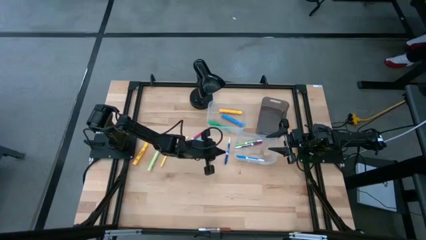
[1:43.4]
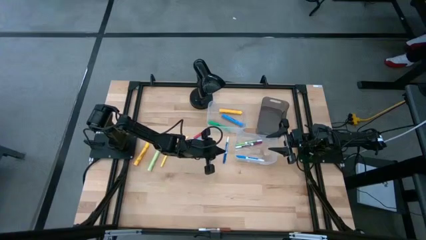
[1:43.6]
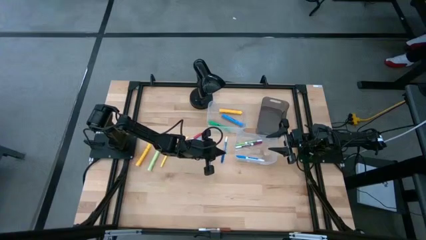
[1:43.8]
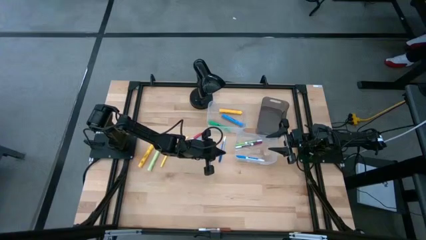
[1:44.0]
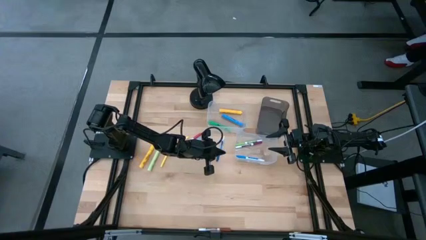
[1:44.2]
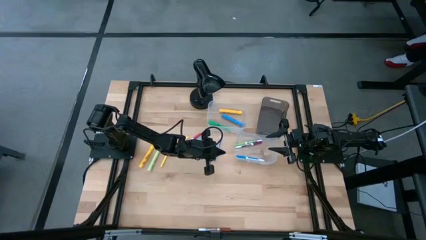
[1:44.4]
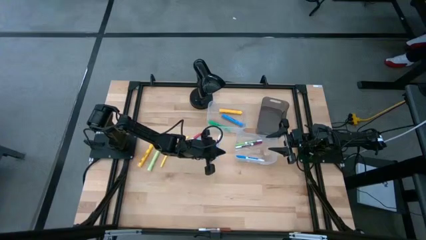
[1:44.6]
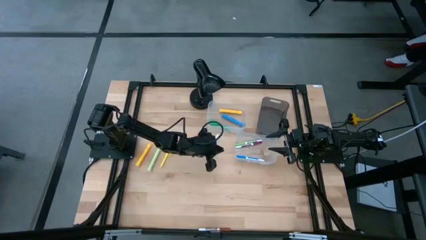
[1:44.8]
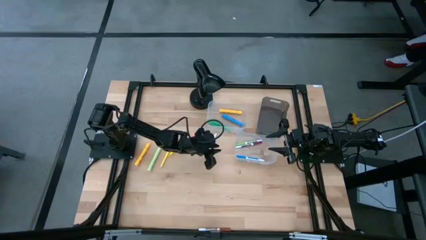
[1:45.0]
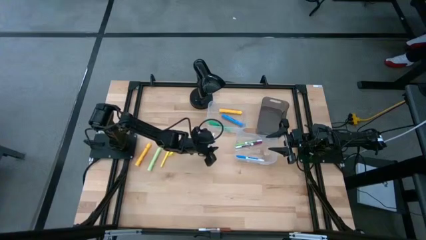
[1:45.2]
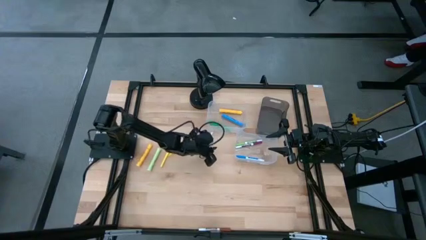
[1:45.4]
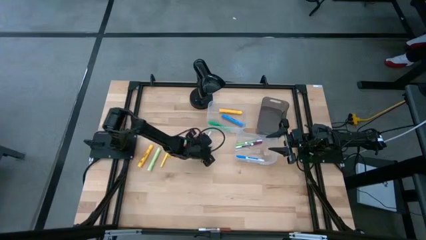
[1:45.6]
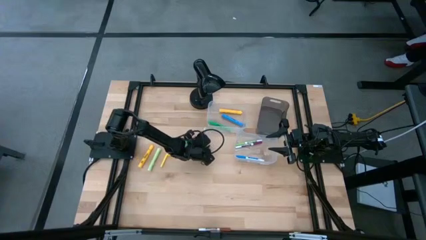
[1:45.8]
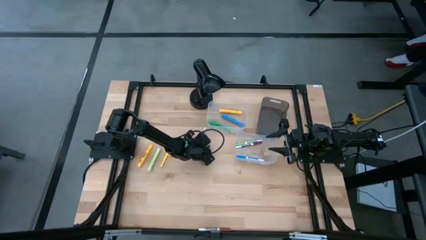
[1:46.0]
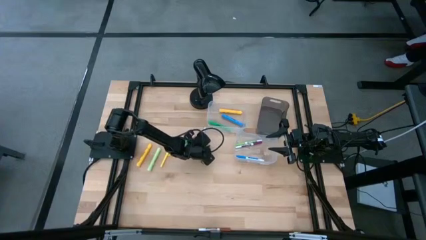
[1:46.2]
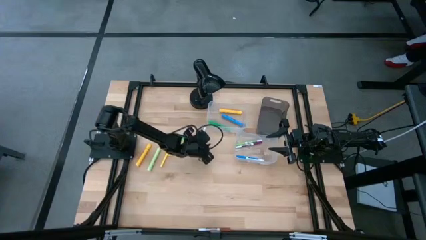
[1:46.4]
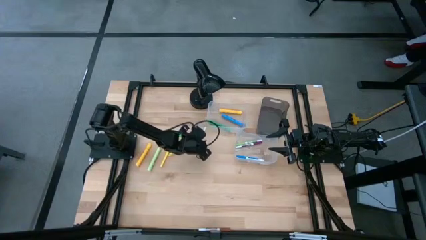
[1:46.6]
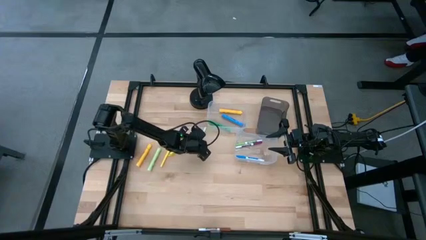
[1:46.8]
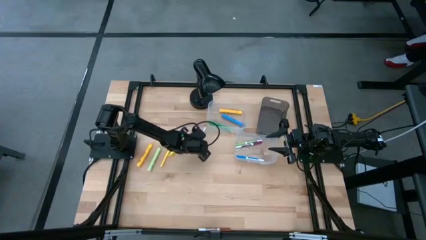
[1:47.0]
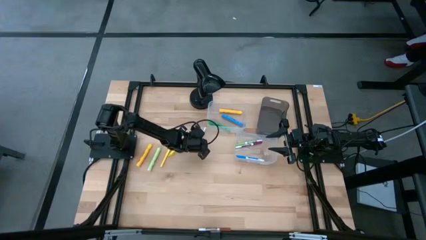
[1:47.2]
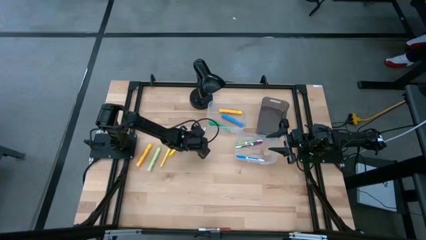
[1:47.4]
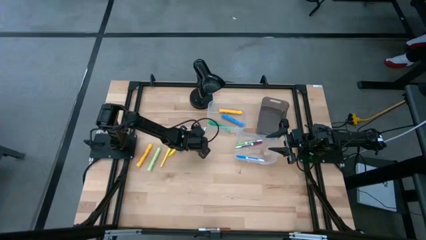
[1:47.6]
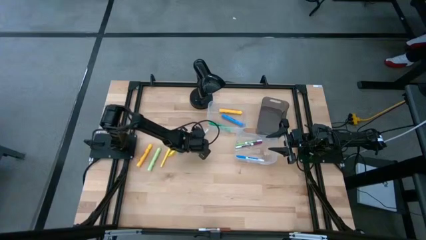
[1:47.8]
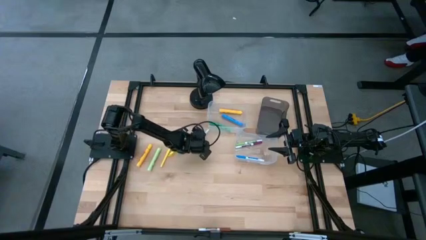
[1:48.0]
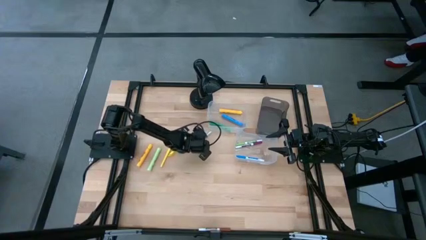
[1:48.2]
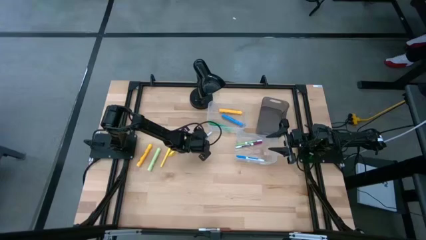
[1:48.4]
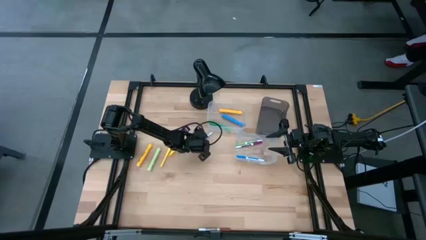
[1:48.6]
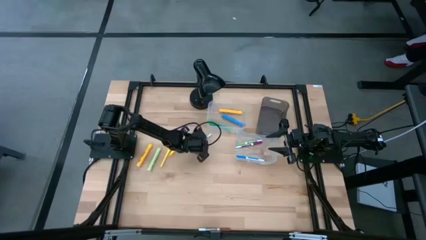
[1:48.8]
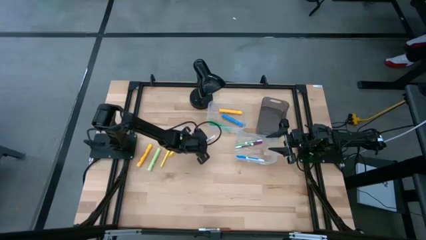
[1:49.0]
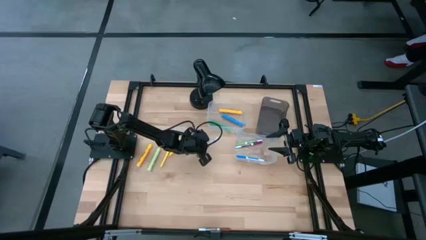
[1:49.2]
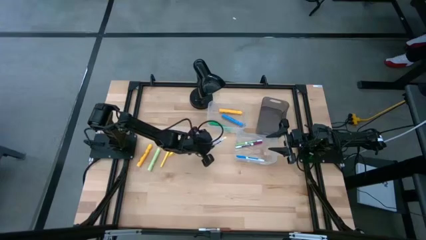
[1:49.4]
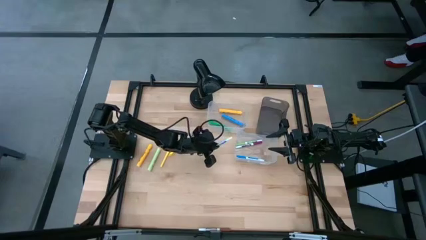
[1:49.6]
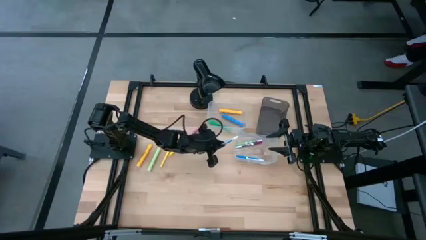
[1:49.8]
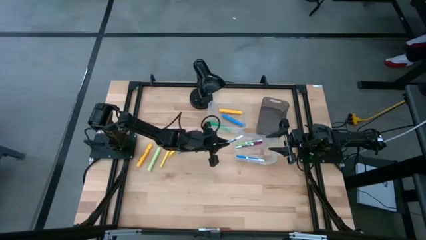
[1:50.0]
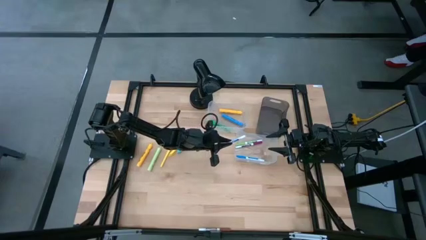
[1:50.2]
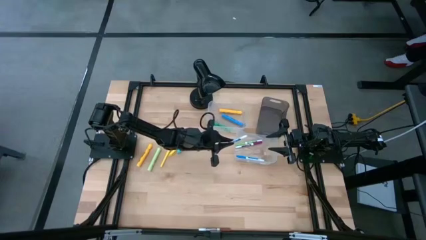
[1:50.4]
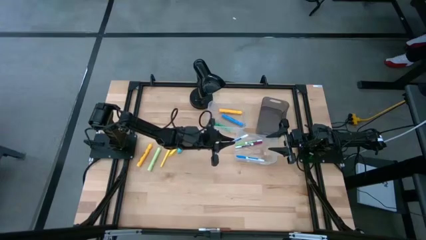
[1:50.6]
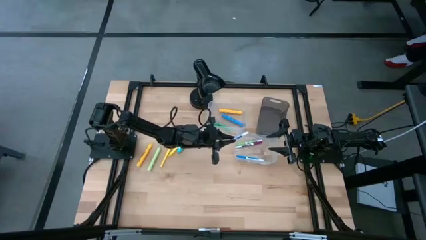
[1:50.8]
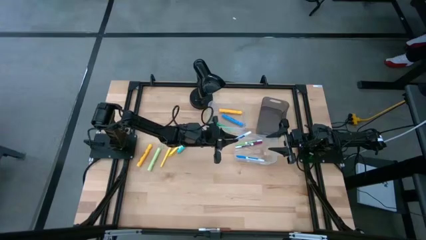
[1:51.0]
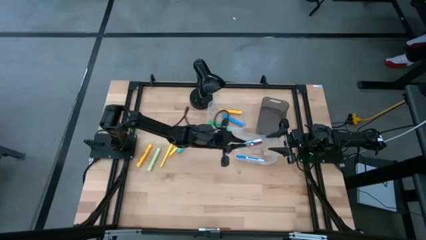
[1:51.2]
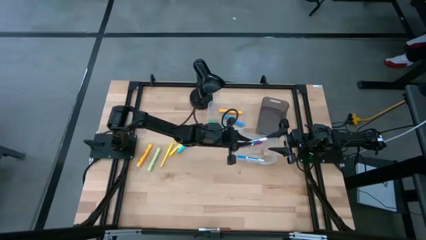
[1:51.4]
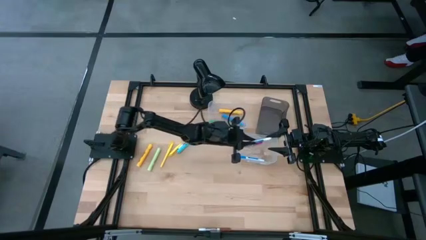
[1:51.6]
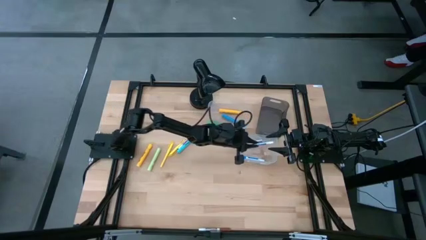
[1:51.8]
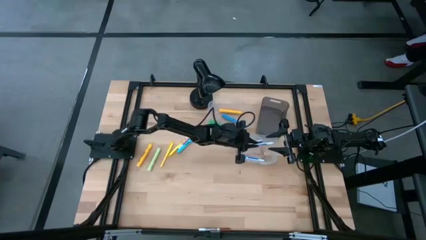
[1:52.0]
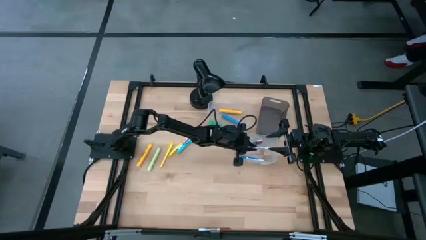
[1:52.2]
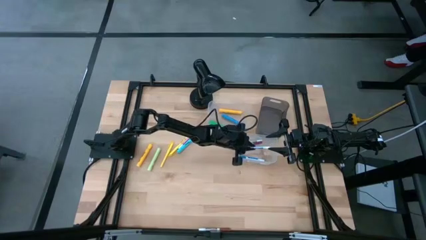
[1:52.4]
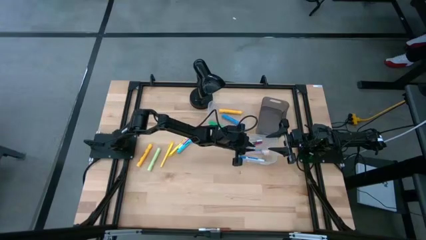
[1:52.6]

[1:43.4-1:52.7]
Task: Pick & Place Markers
Put the dark blue marker pen into the bottom transparent bin

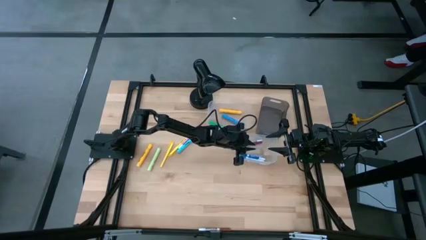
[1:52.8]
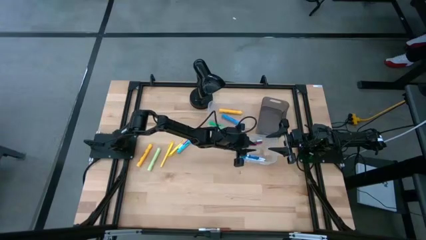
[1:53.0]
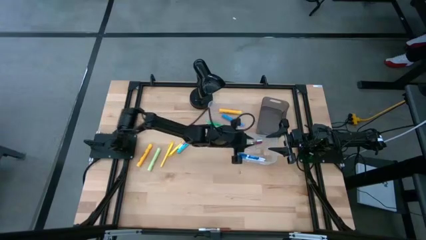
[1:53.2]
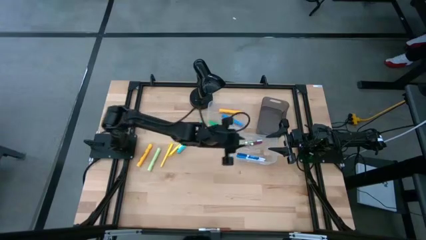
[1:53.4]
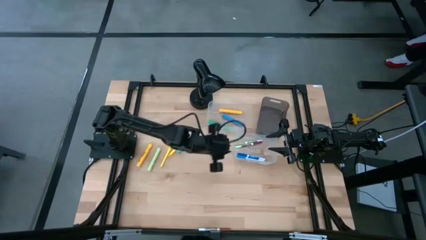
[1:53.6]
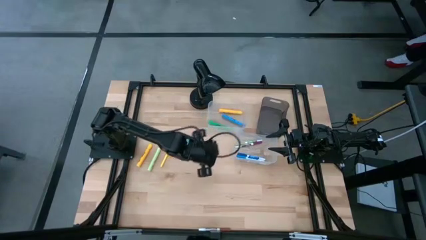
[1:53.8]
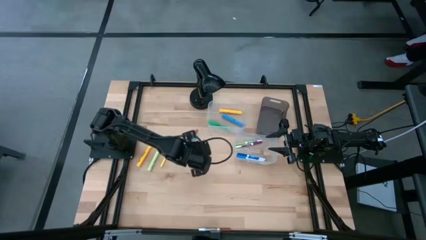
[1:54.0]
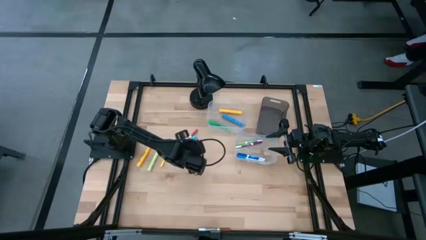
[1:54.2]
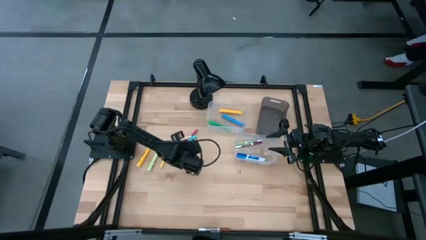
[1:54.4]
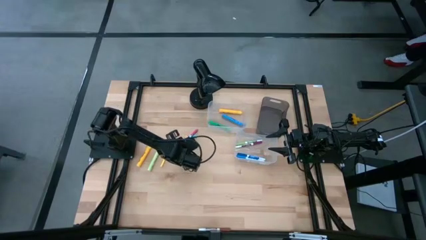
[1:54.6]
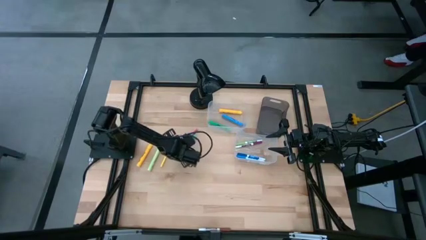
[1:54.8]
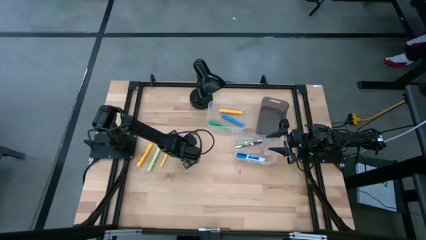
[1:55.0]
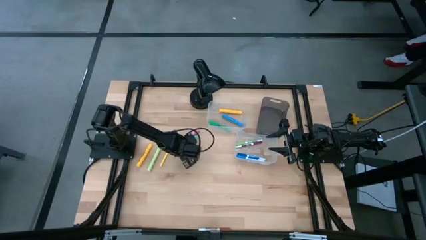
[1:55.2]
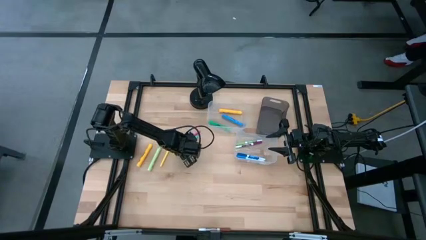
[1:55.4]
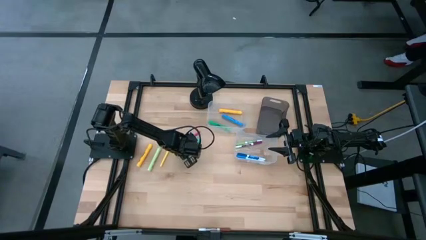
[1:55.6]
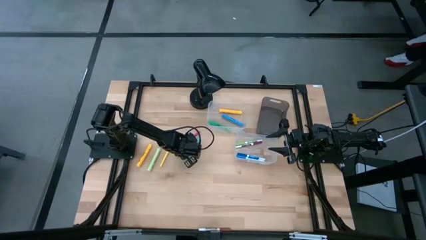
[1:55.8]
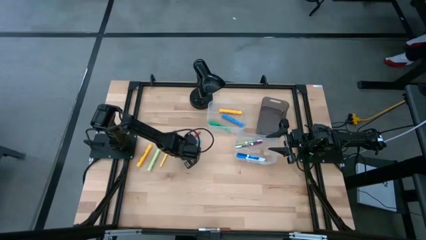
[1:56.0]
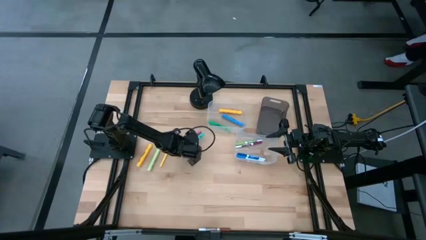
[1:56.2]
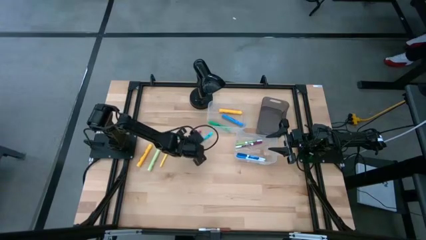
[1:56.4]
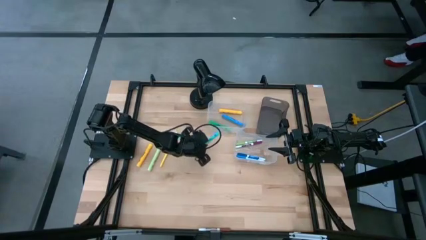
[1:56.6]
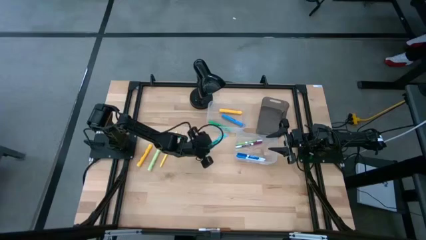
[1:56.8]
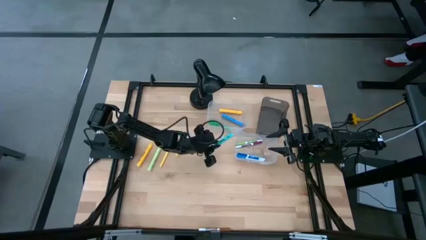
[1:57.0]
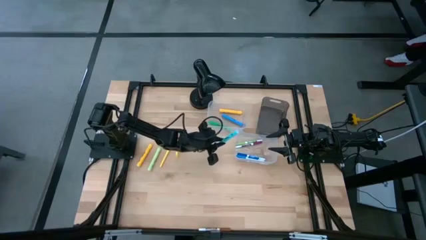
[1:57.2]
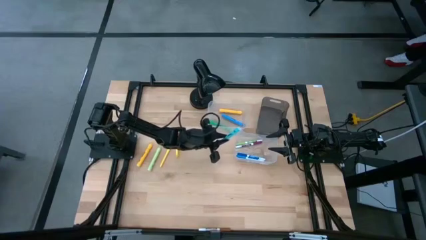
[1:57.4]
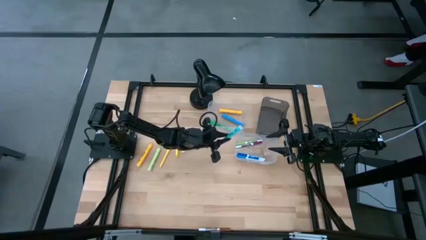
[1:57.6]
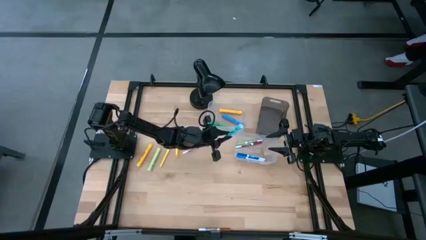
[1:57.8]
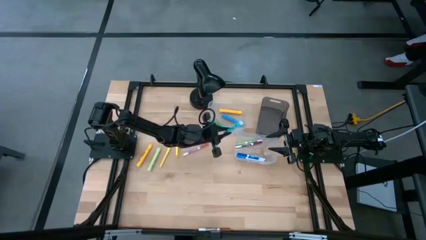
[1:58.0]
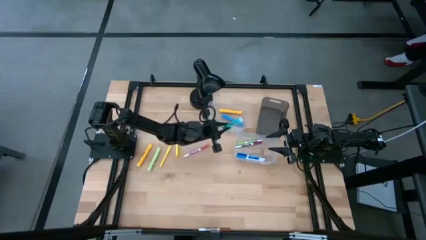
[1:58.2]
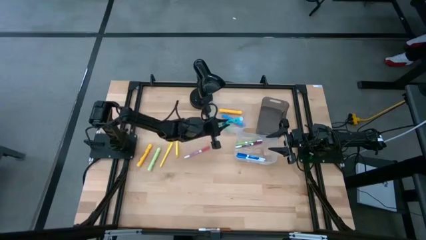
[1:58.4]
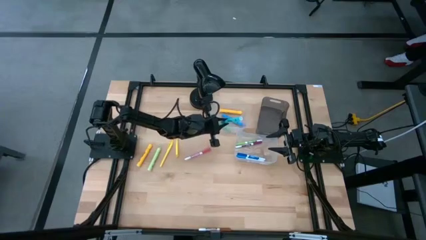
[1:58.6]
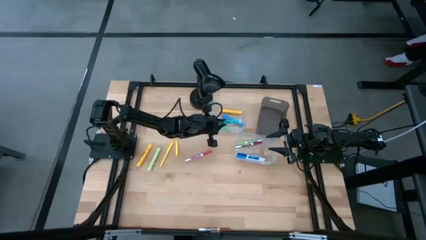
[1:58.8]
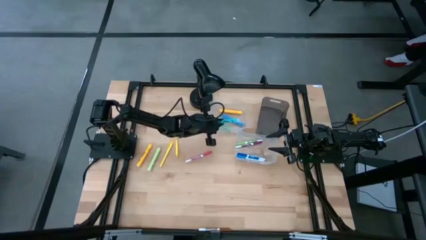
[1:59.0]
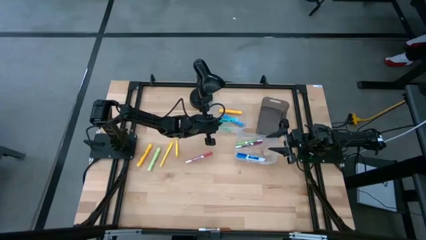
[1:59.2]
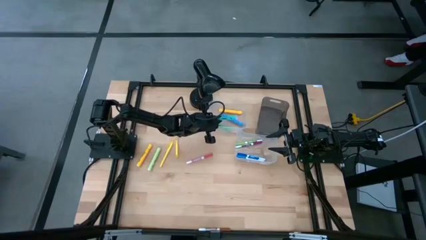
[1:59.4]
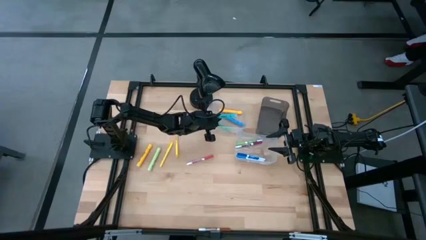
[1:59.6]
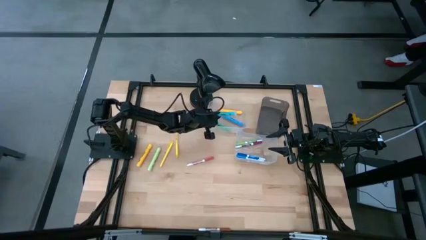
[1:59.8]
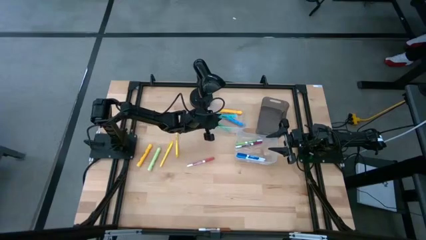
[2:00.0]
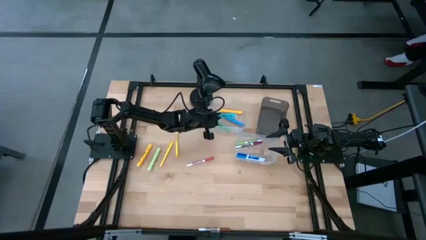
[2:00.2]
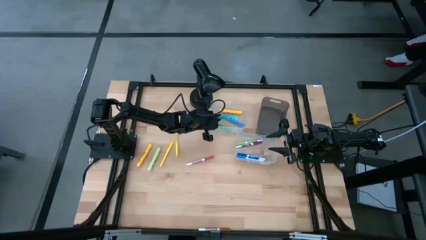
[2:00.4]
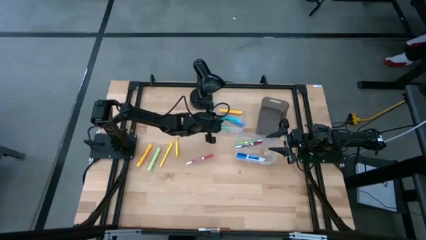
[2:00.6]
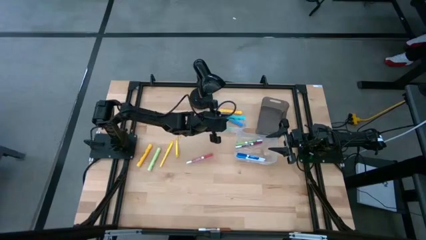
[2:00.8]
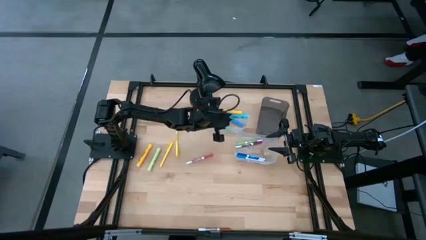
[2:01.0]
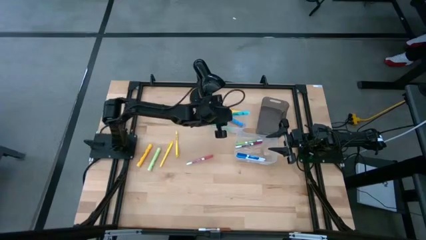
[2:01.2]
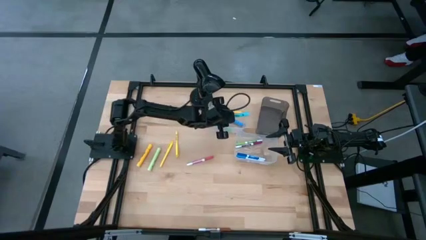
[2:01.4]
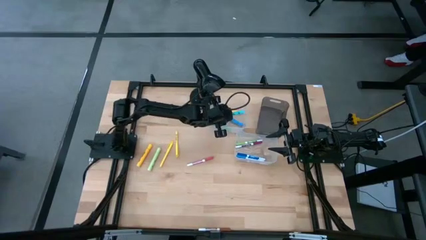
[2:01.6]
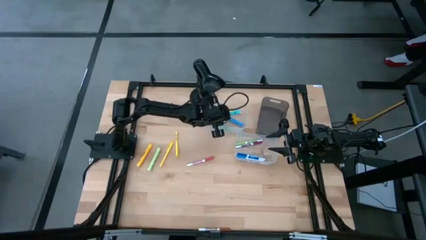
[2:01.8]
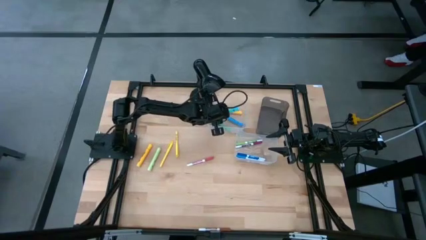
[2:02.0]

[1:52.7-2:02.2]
Put the light blue highlighter pen into the top transparent bin
